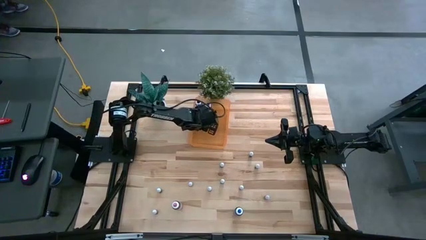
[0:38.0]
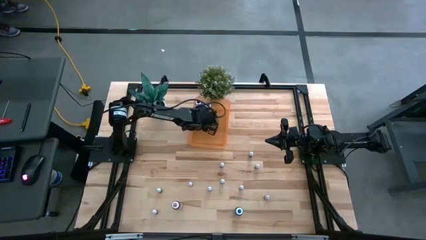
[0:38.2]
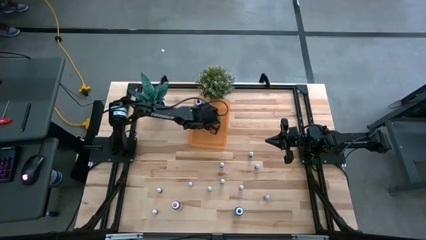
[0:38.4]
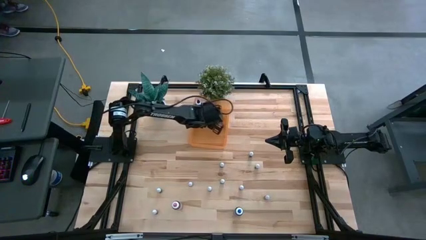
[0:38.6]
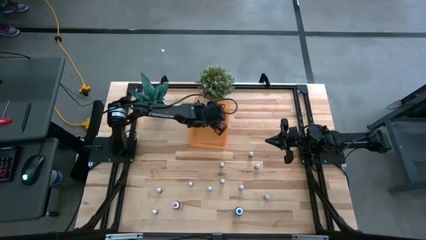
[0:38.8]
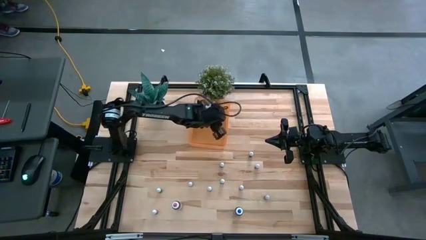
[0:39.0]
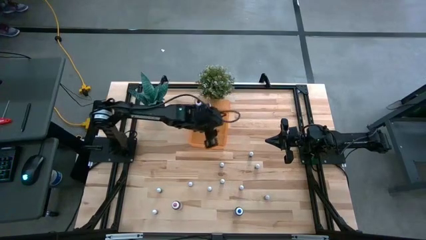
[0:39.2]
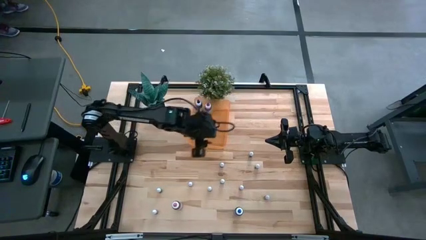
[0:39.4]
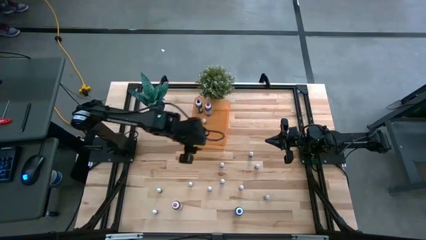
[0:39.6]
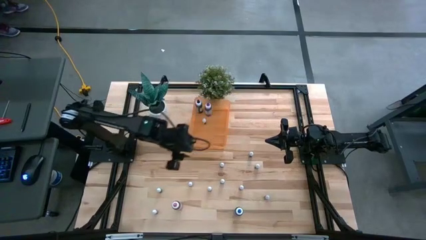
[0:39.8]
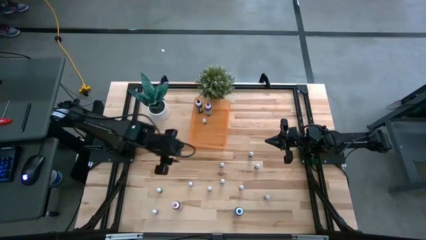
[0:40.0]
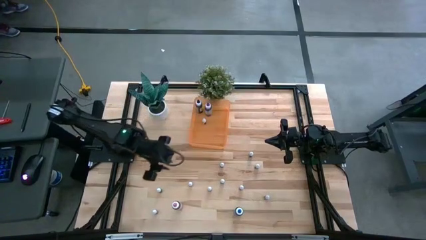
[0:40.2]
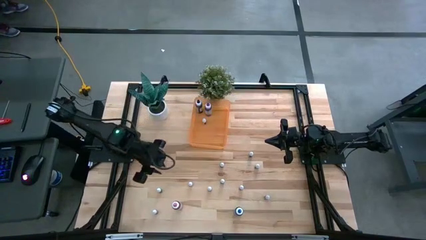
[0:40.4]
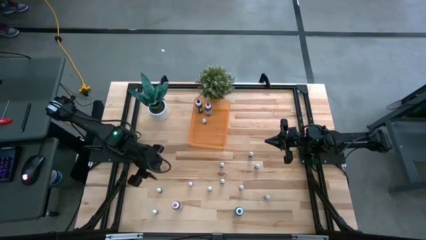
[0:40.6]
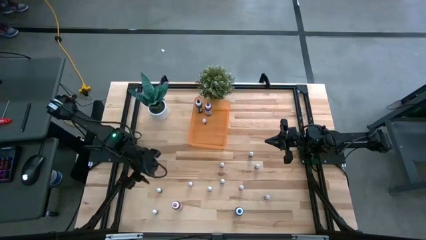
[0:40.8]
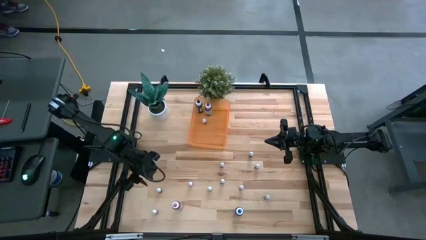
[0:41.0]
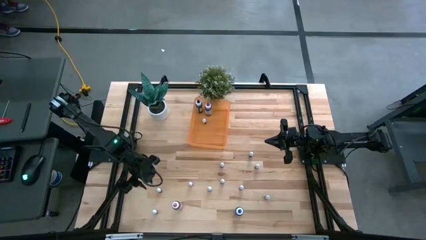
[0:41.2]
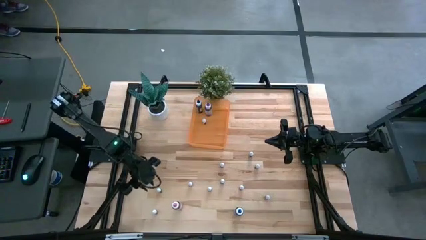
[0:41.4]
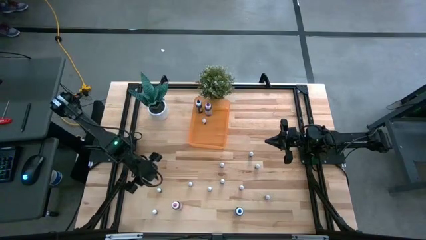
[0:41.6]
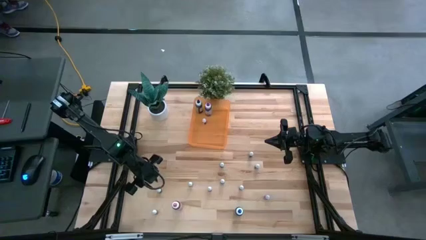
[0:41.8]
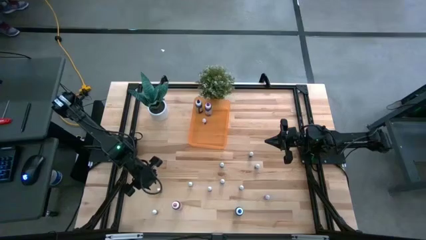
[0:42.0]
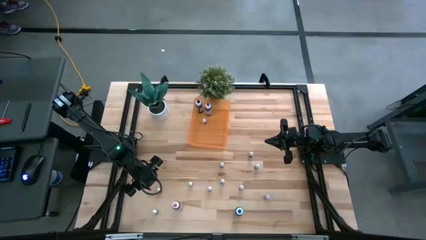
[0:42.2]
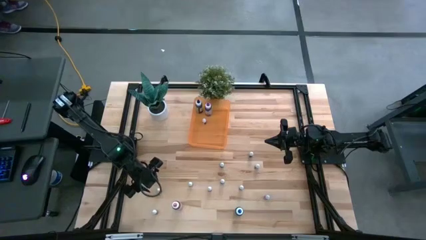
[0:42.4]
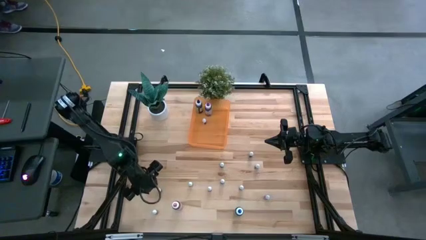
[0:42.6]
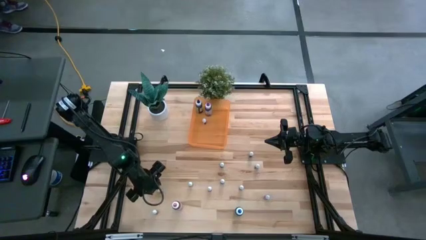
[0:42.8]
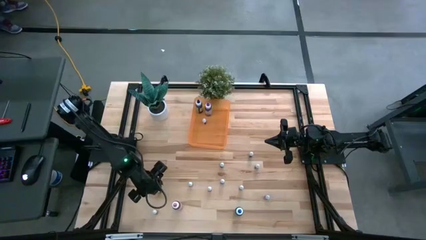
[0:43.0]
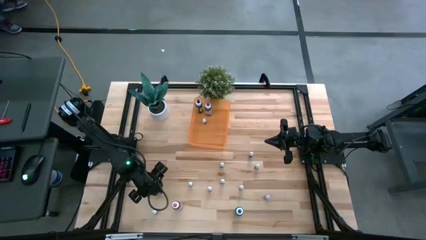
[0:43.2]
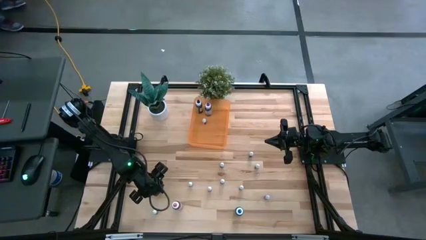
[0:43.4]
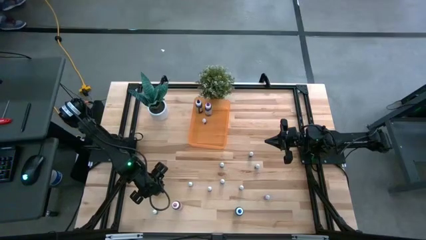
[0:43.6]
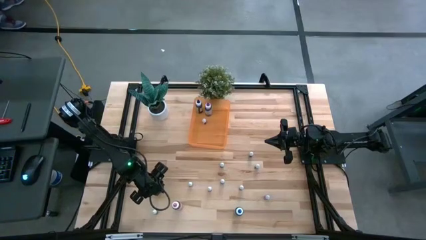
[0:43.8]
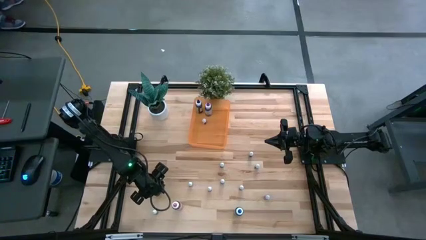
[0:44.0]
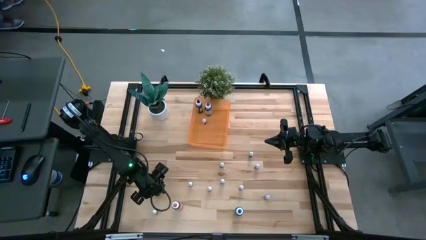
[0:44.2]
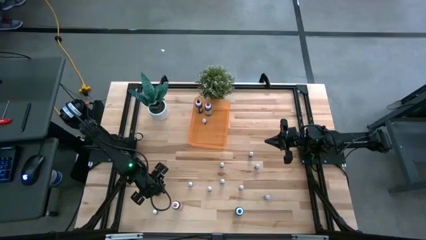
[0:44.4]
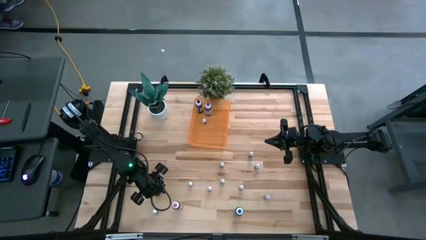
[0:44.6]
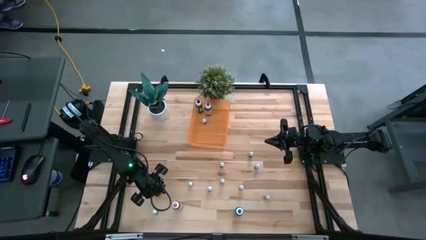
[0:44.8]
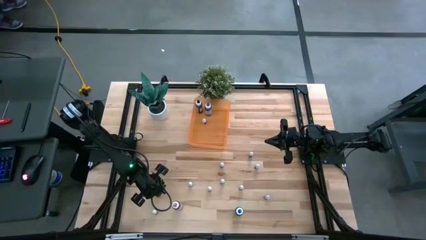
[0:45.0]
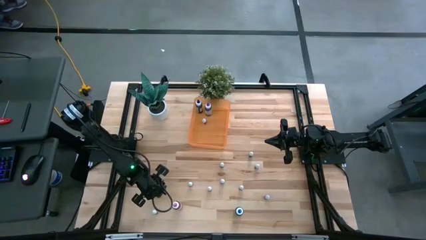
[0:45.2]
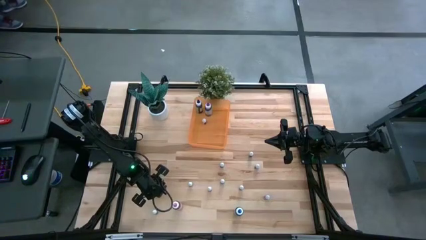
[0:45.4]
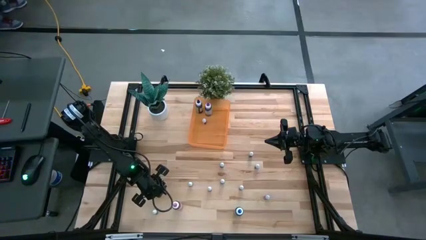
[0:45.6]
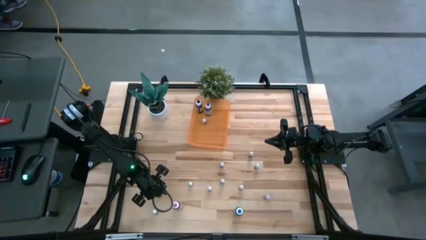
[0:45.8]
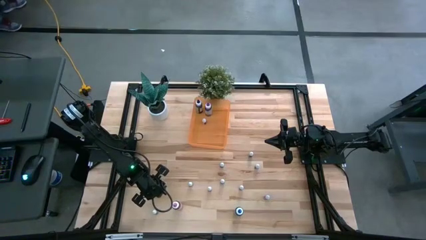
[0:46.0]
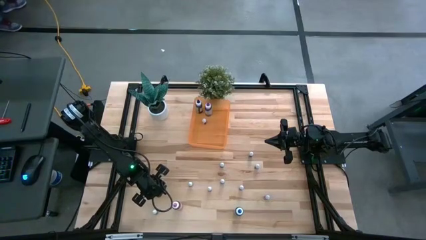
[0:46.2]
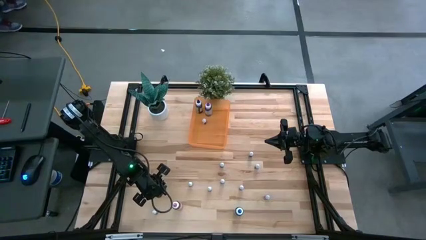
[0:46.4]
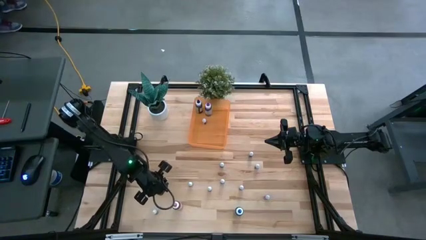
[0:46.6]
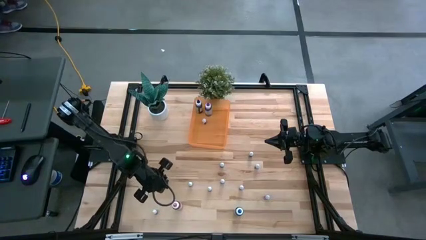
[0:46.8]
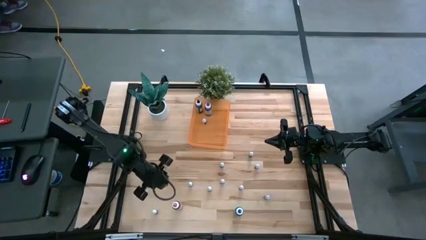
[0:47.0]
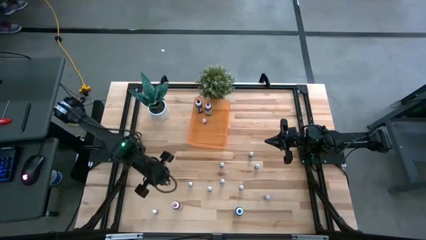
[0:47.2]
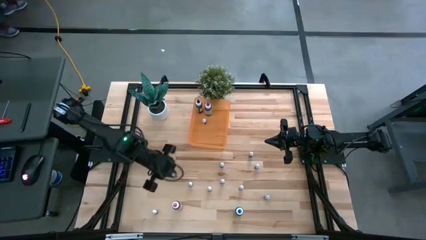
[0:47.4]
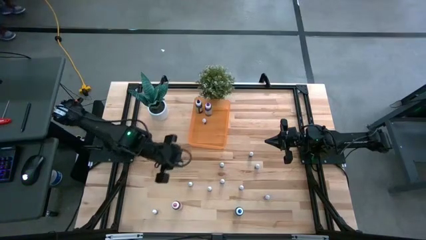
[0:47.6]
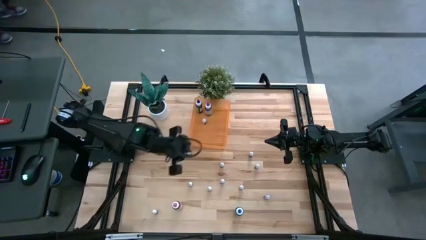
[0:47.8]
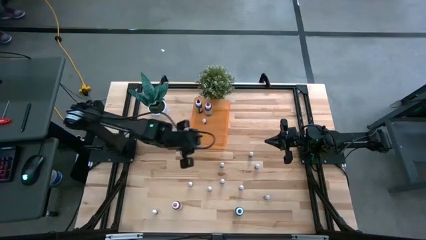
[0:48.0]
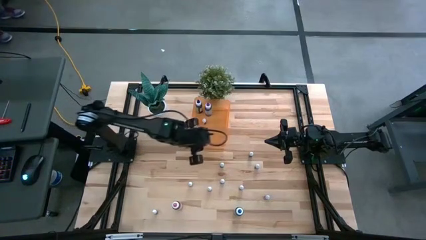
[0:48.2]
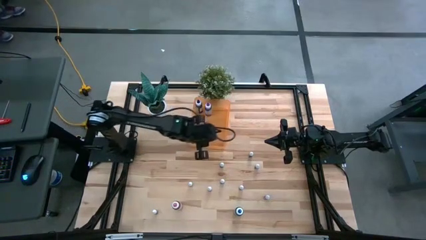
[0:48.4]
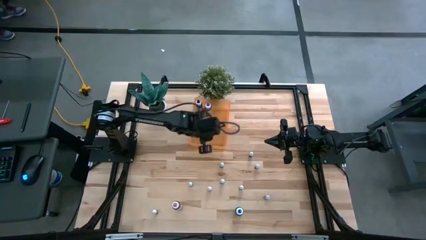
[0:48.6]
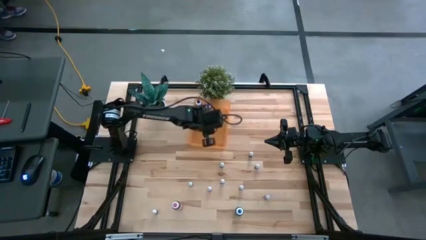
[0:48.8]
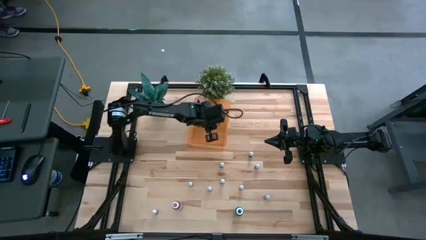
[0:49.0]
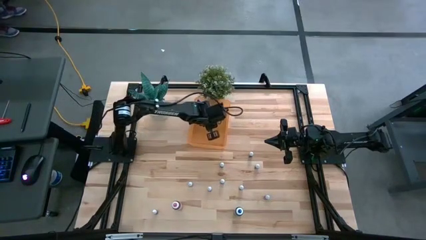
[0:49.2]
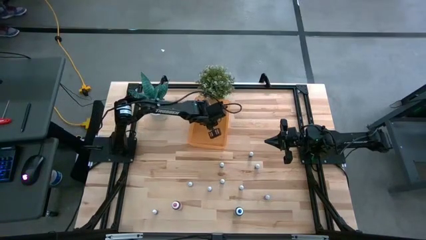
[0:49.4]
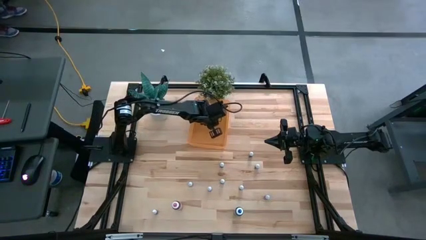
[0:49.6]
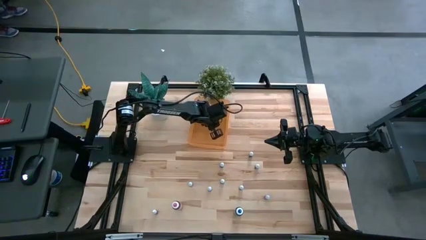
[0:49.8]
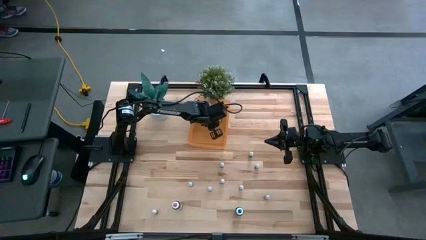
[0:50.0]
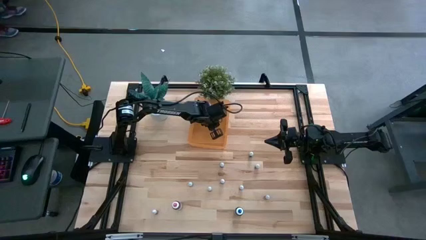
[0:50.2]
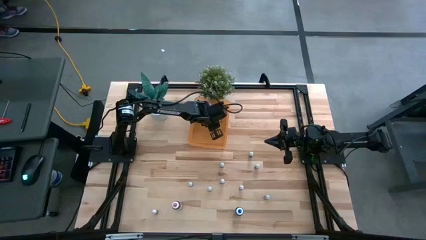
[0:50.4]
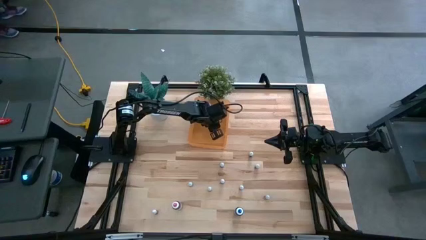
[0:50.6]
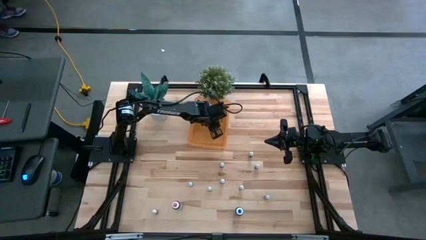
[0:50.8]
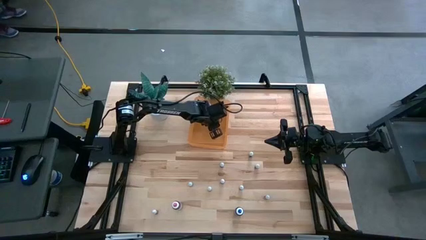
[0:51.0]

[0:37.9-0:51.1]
Task: Pick & Place food coloring
Put the small blue food coloring bottle into the orange bin
